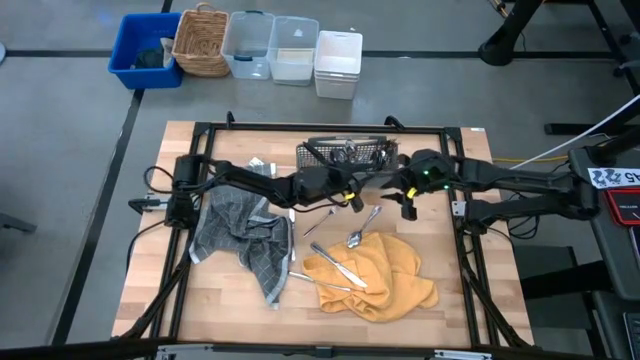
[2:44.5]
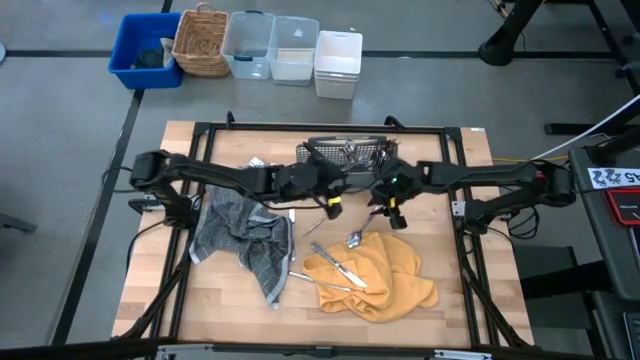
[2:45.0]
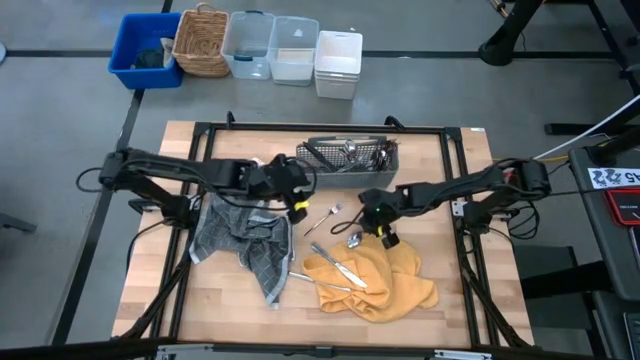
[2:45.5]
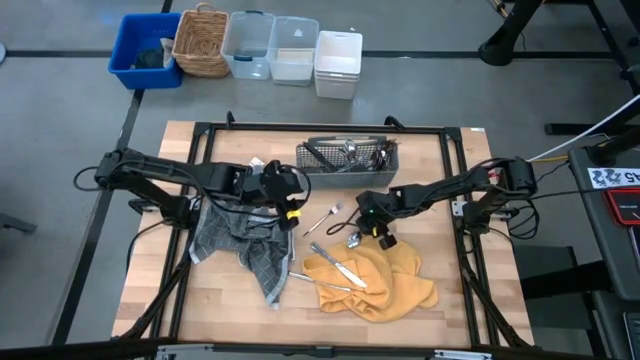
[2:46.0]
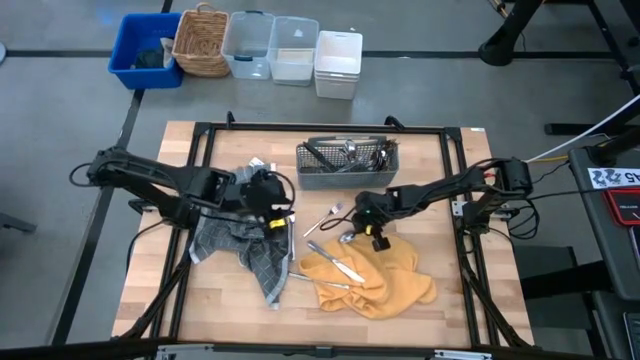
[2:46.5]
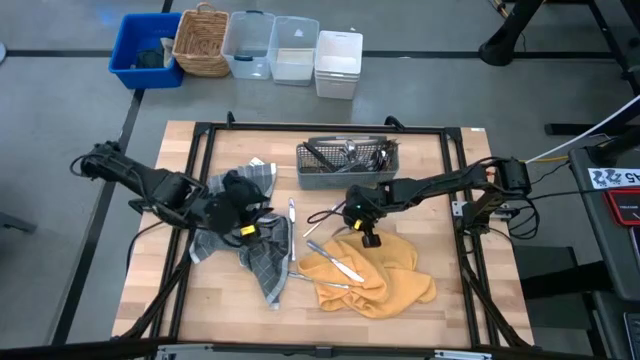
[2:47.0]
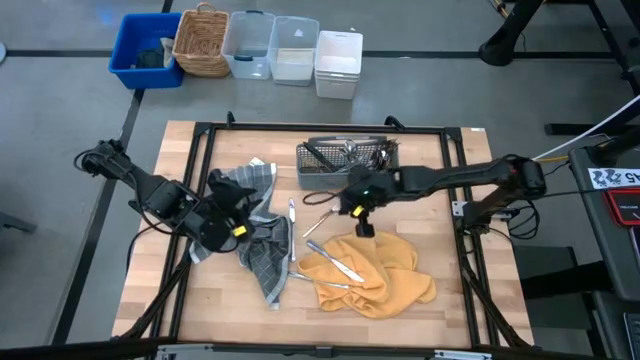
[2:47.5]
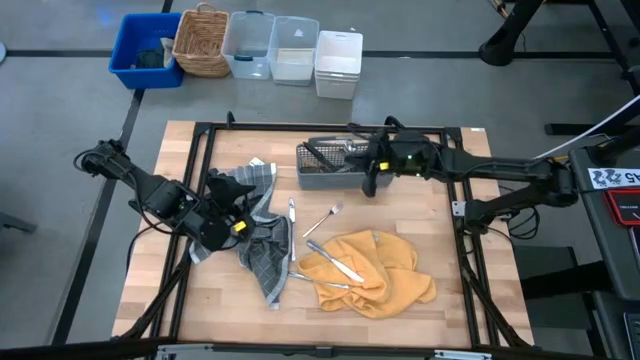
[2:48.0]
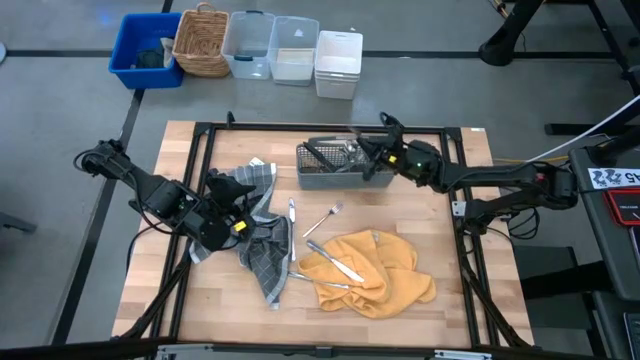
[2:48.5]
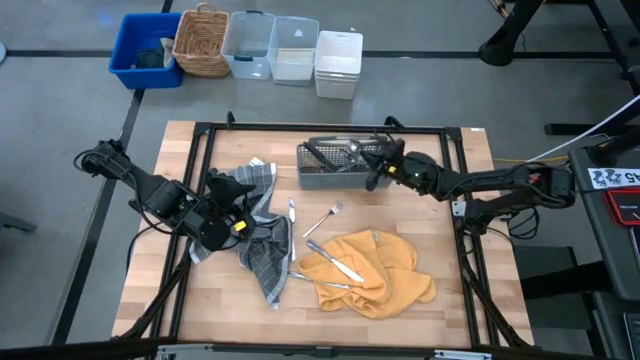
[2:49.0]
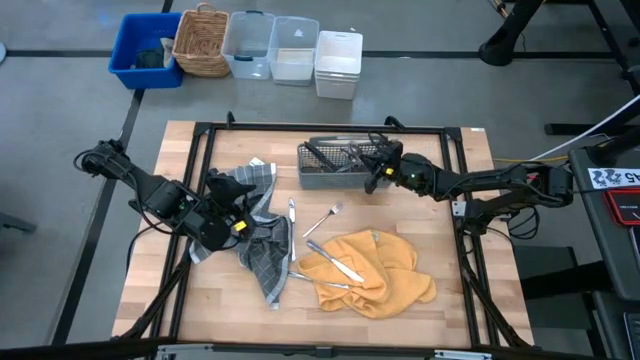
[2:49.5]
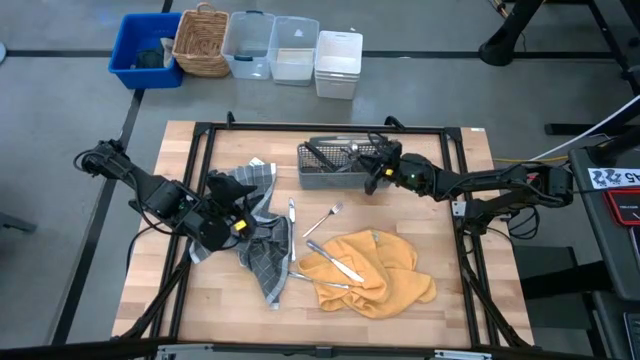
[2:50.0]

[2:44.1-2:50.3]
Task: Sort silverware
Put the silver spoon into the gray utensil holder

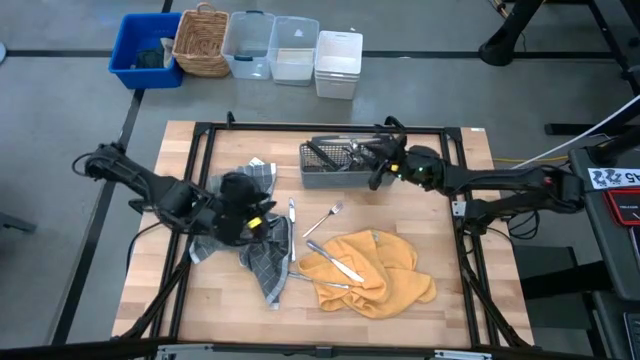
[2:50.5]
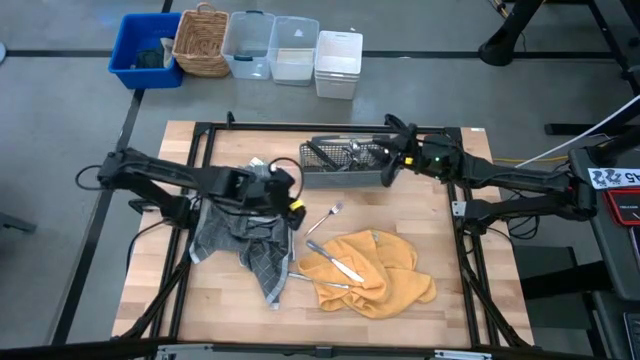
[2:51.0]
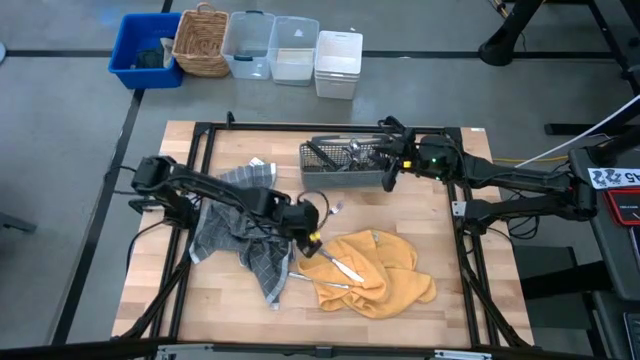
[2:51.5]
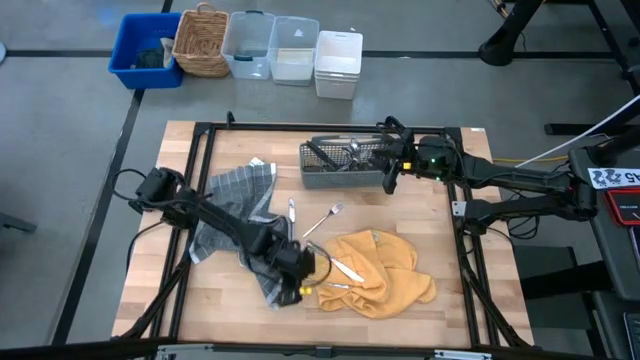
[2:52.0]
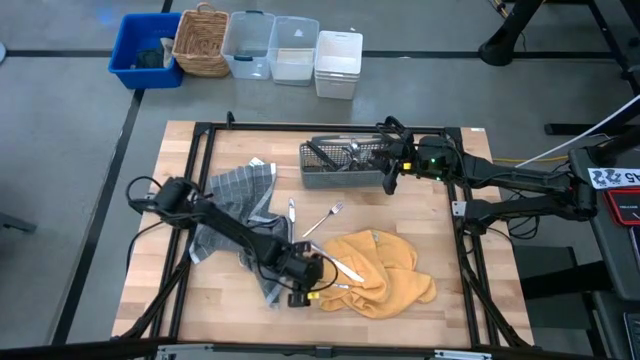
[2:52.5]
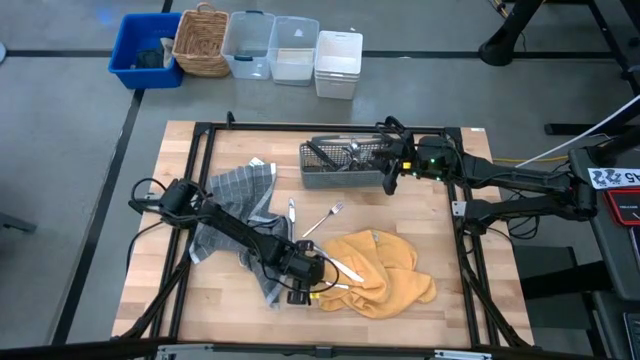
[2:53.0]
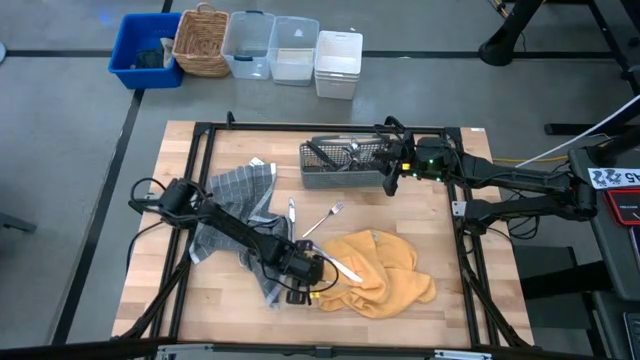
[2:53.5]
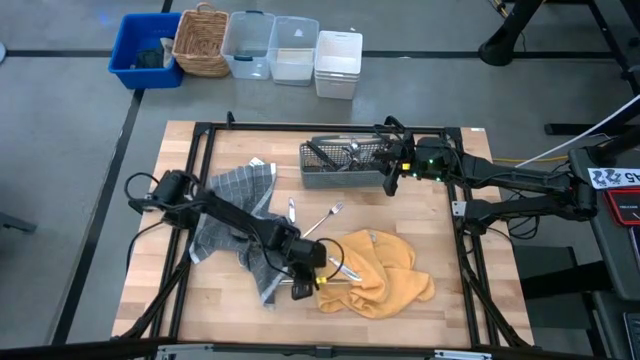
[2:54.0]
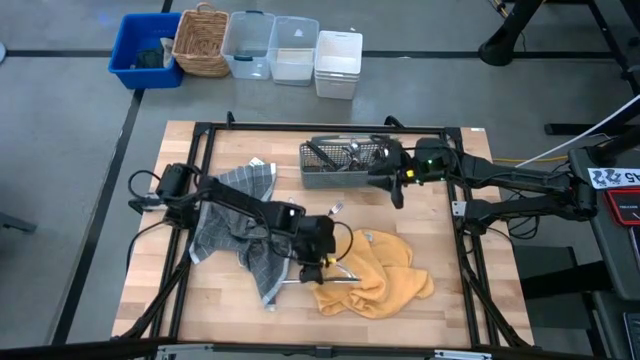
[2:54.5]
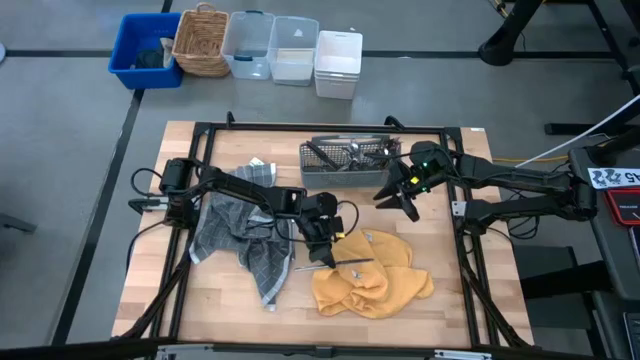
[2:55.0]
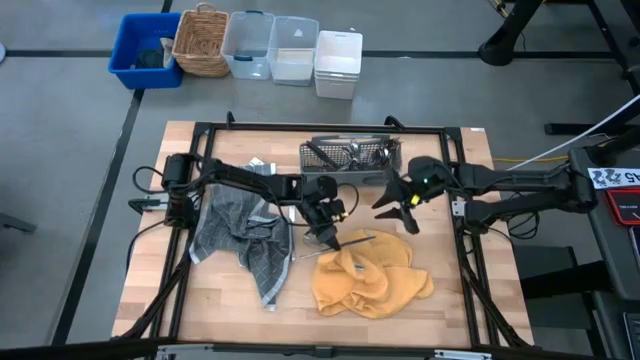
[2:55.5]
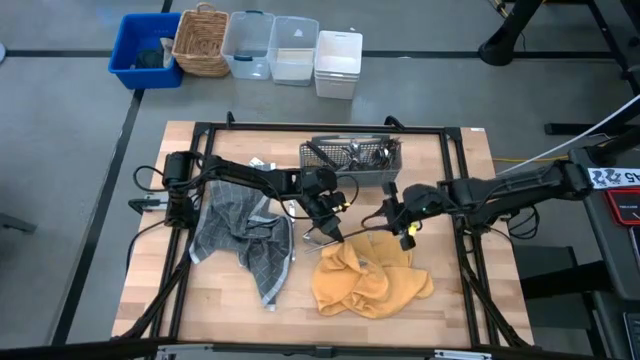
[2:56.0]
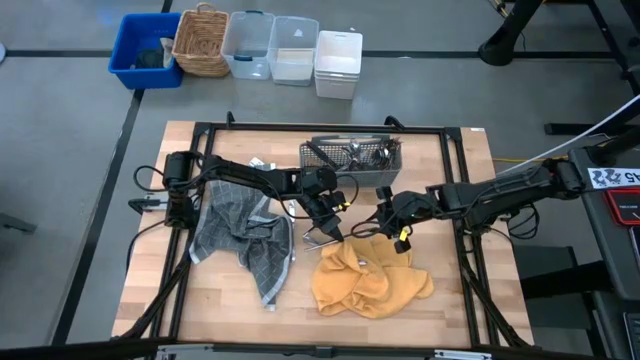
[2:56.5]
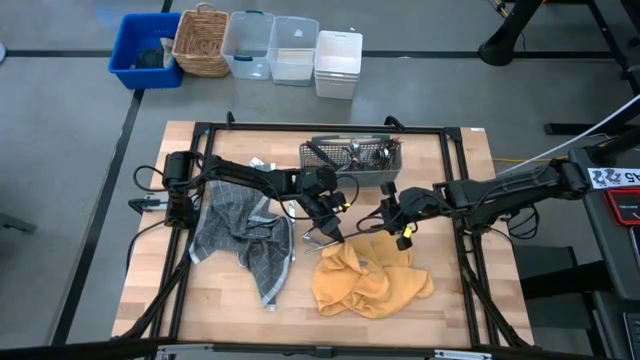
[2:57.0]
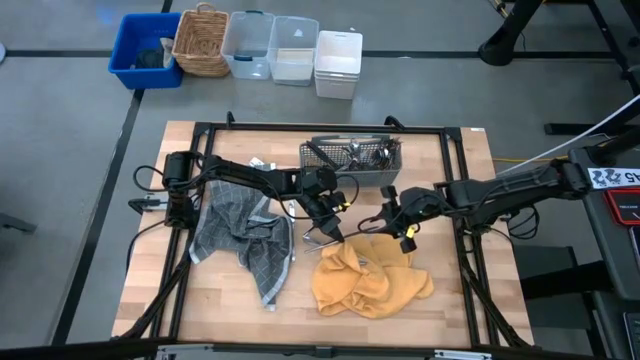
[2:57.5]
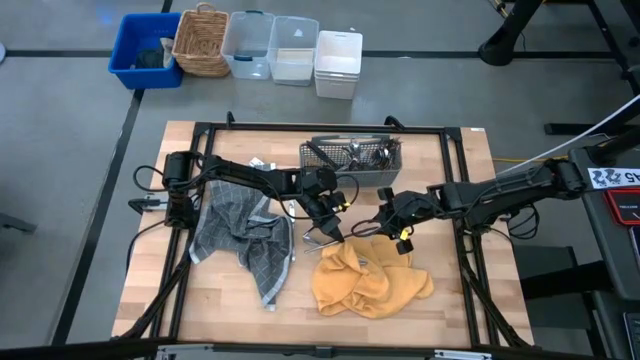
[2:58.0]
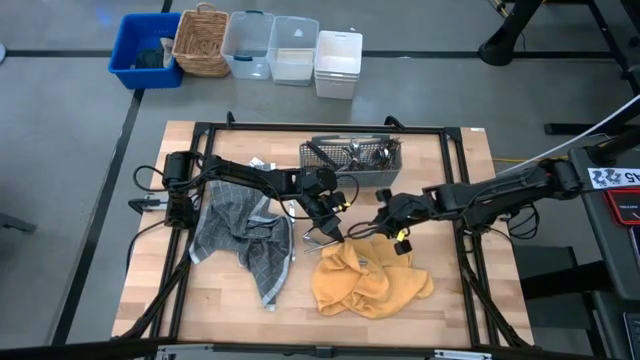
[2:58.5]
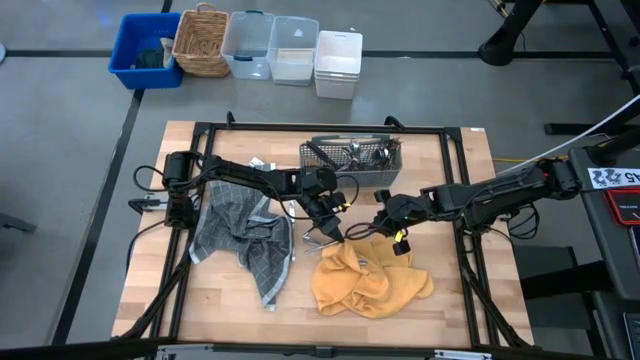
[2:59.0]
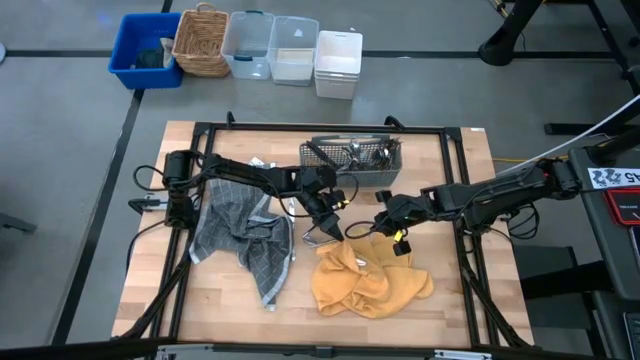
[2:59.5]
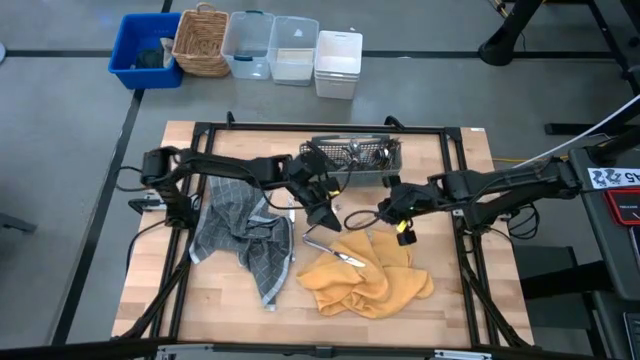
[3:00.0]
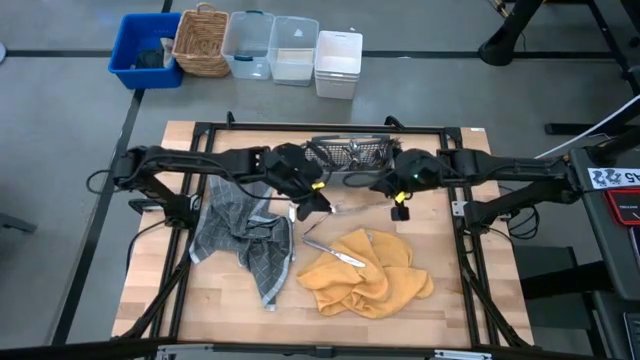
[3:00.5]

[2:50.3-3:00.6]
Put the silver knife into the gray utensil holder

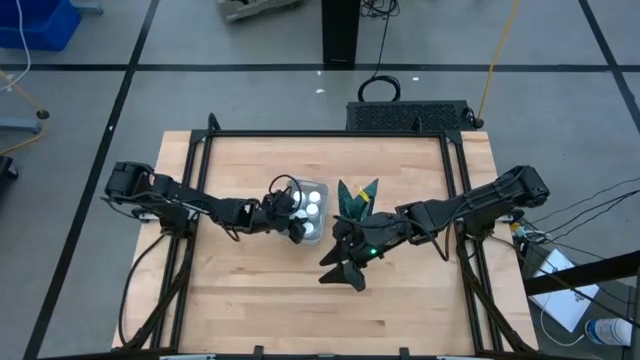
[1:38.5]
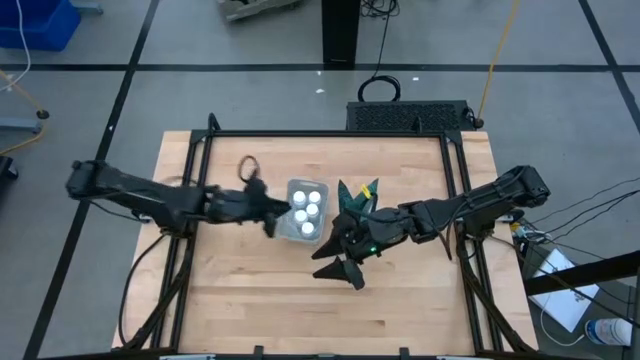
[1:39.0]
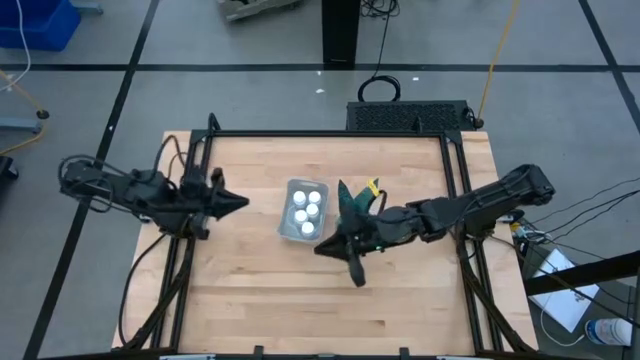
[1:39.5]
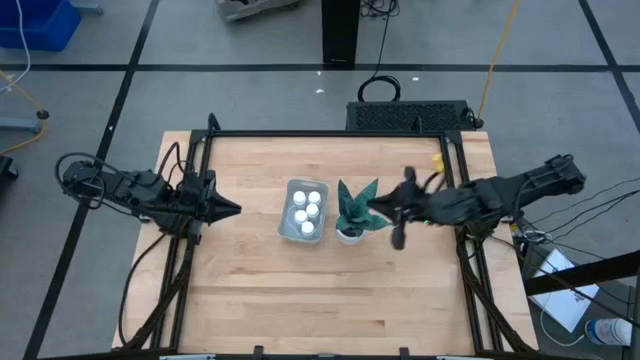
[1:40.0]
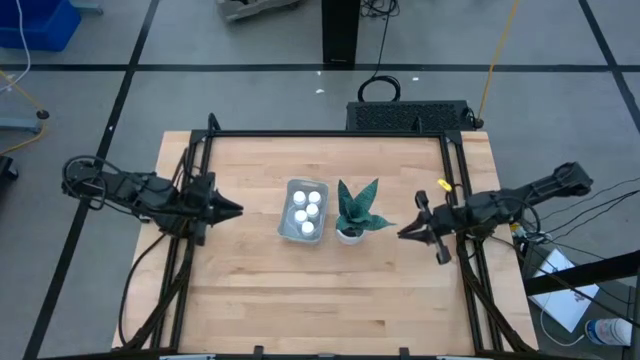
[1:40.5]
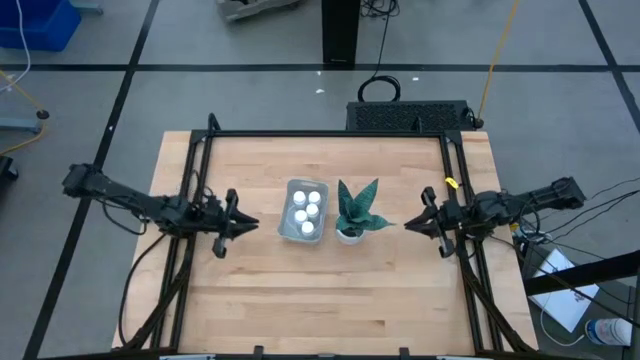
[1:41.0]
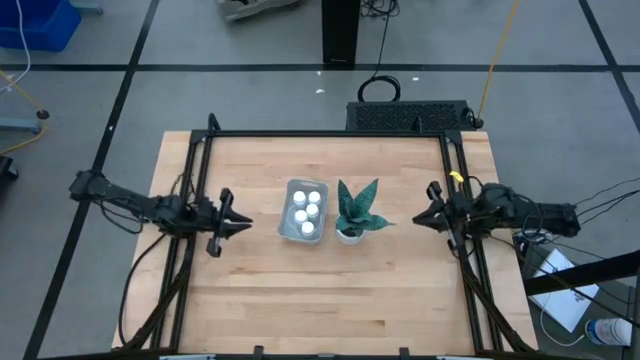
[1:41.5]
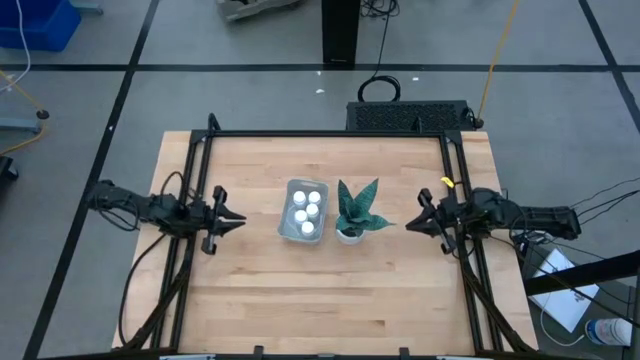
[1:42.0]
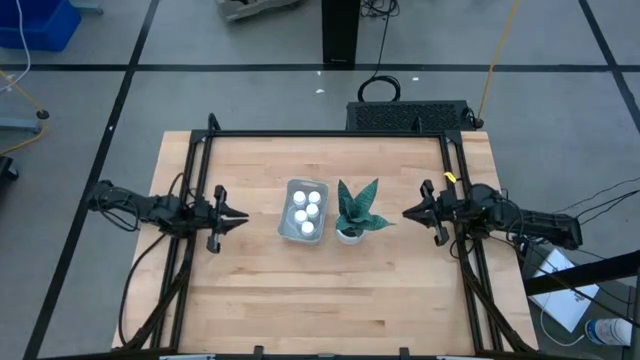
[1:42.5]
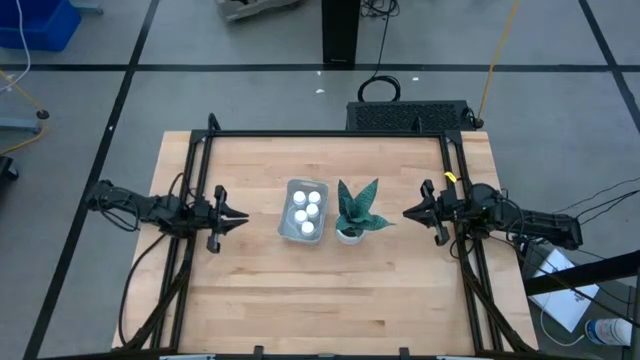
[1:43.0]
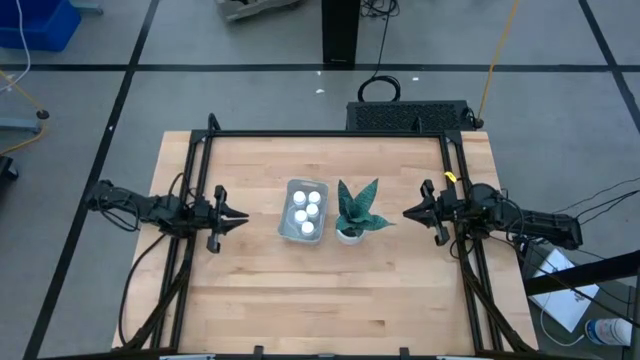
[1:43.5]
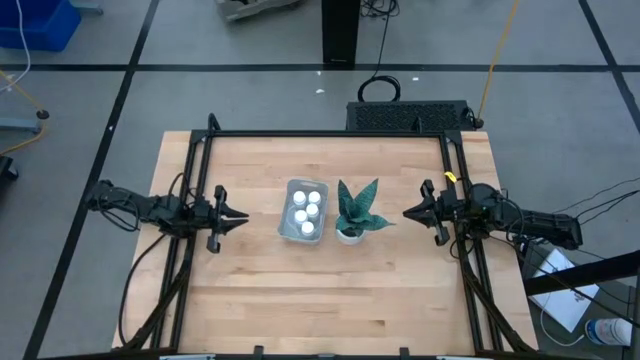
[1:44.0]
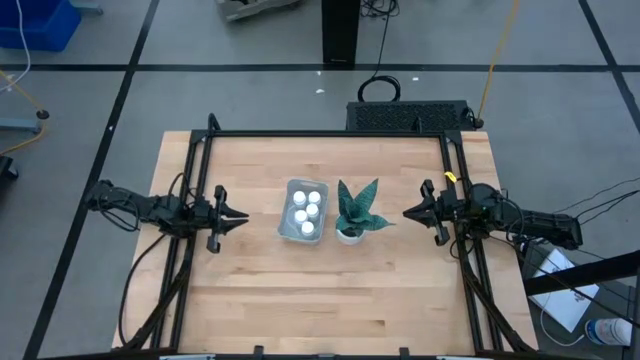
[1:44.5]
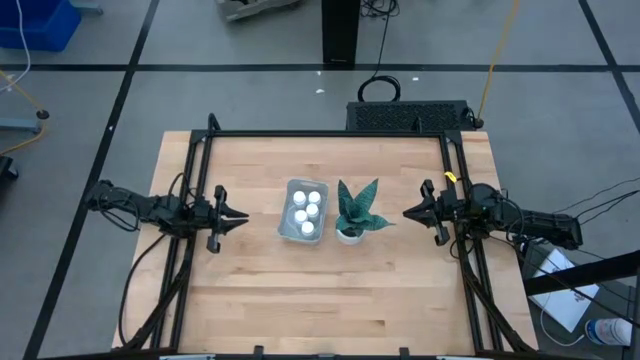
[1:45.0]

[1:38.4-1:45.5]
Task: Pick and place pill bottles into a basket
Return to Home Position
